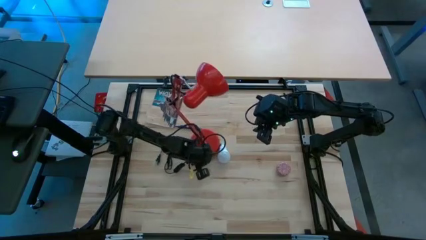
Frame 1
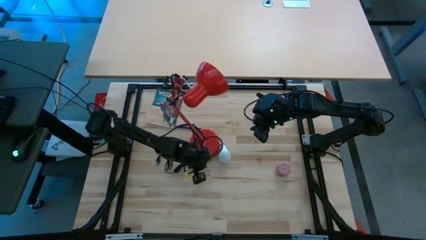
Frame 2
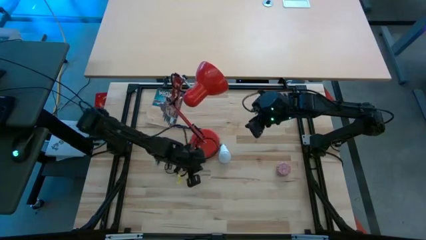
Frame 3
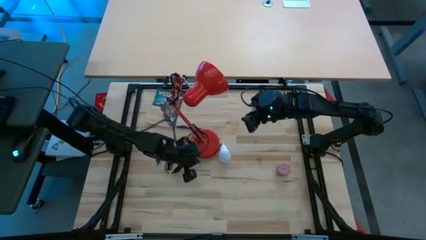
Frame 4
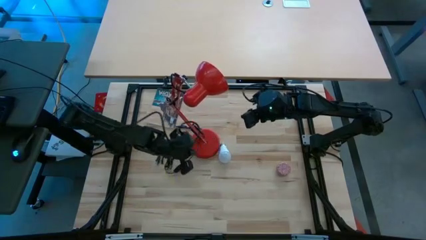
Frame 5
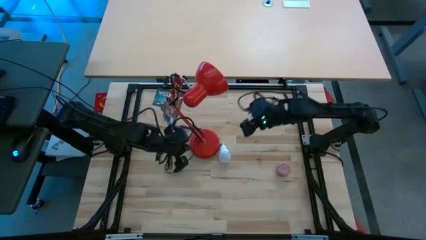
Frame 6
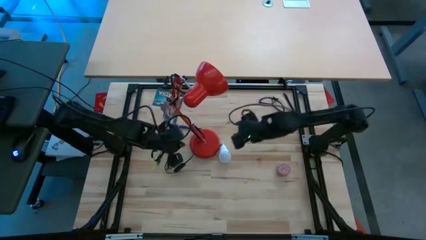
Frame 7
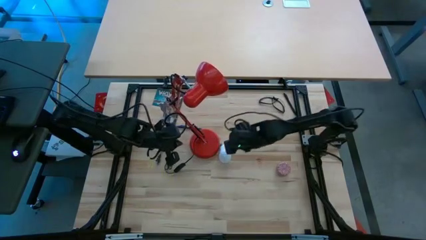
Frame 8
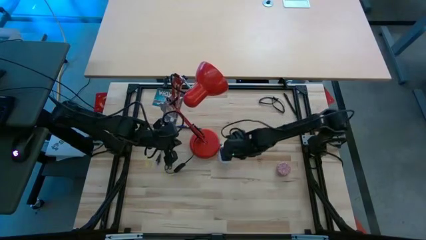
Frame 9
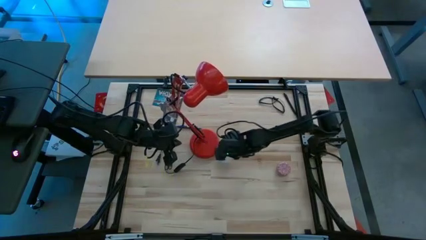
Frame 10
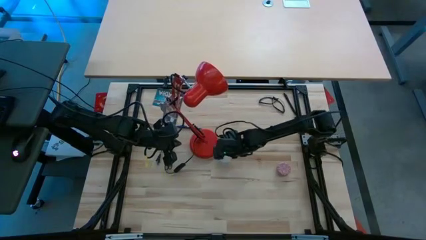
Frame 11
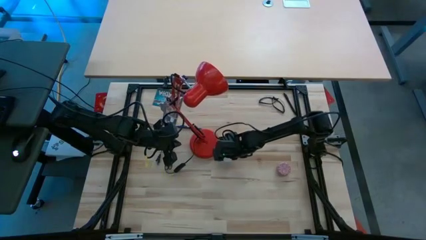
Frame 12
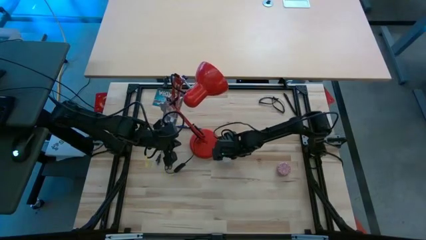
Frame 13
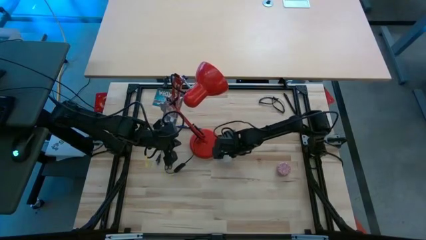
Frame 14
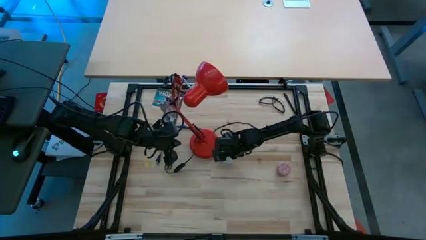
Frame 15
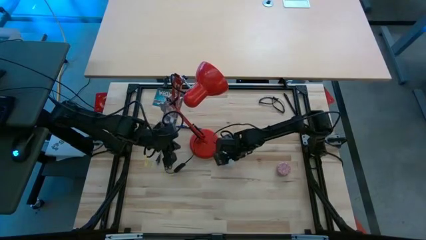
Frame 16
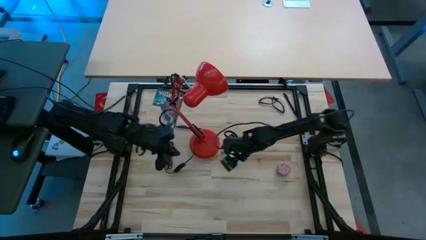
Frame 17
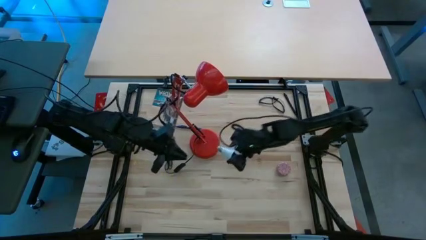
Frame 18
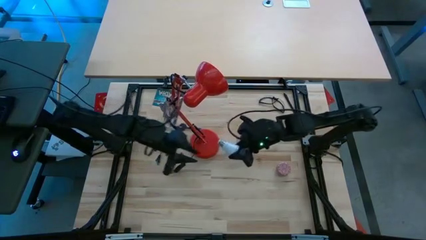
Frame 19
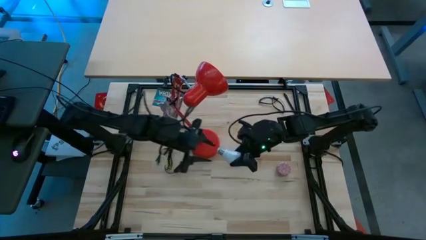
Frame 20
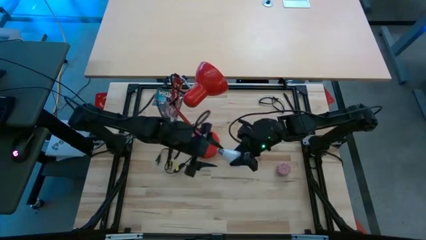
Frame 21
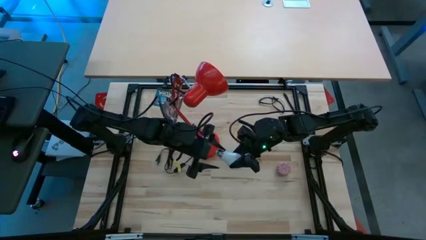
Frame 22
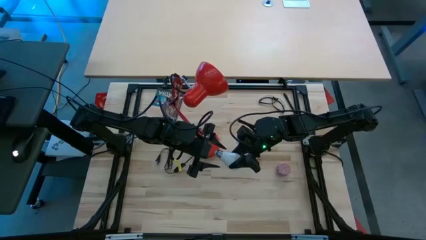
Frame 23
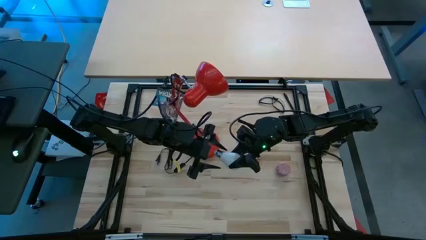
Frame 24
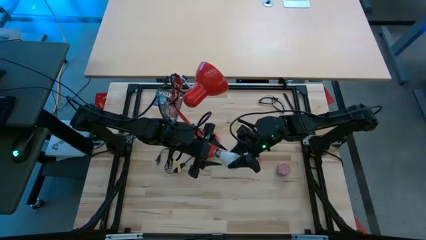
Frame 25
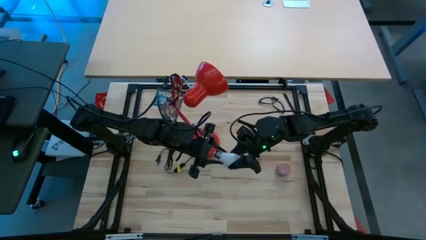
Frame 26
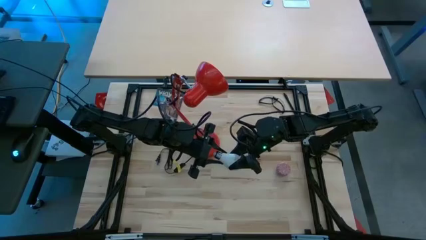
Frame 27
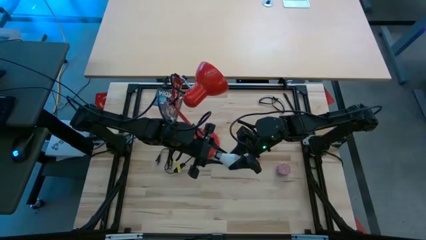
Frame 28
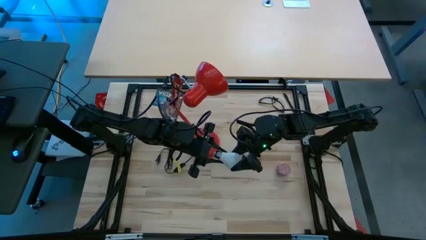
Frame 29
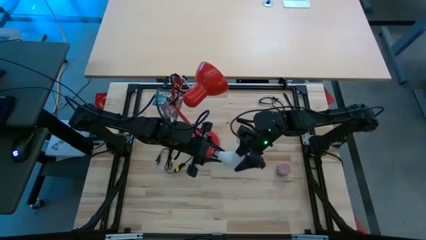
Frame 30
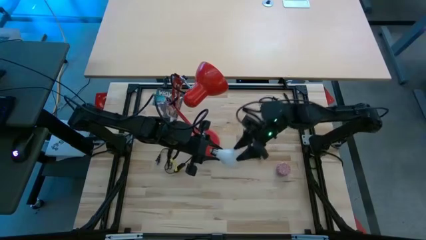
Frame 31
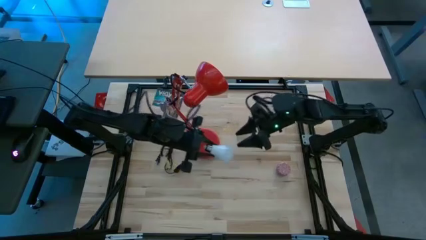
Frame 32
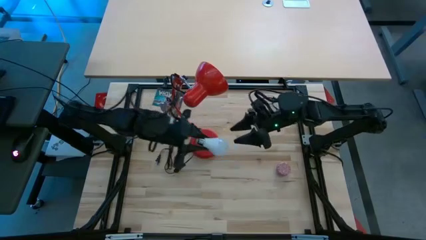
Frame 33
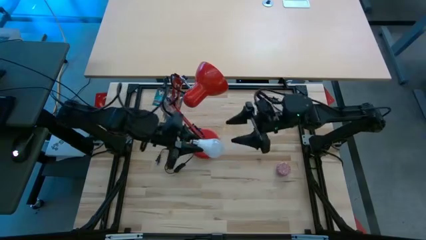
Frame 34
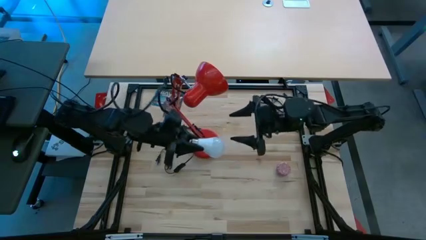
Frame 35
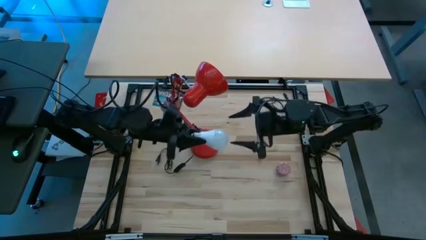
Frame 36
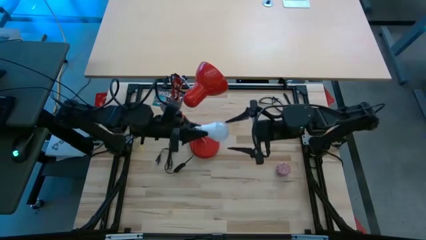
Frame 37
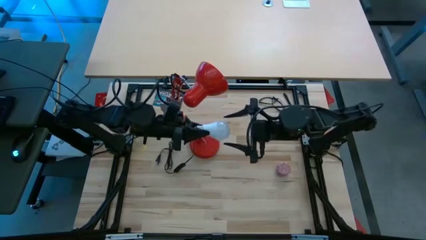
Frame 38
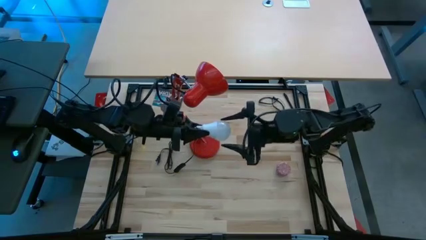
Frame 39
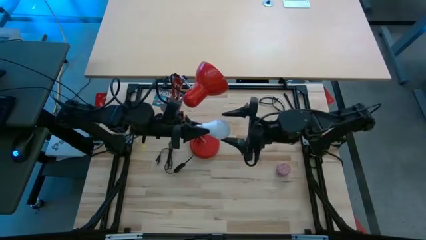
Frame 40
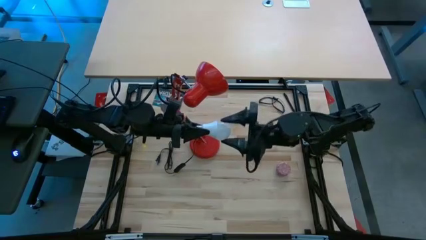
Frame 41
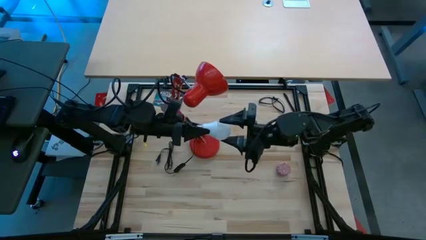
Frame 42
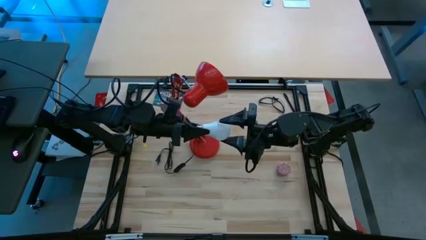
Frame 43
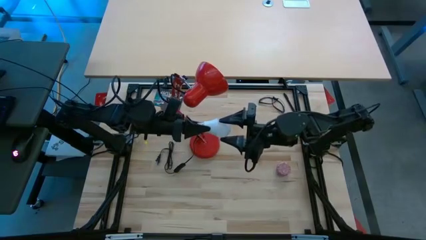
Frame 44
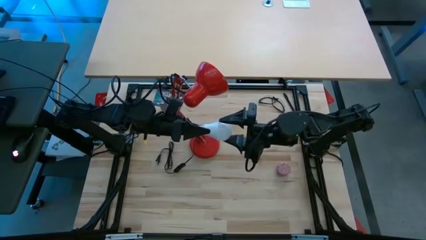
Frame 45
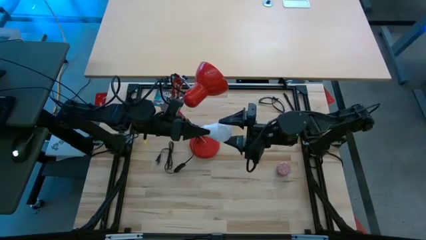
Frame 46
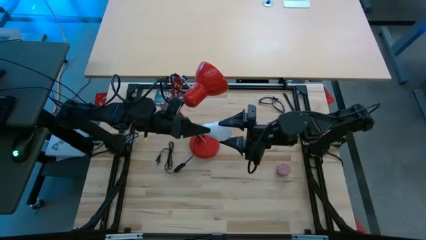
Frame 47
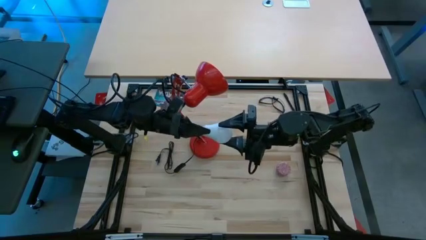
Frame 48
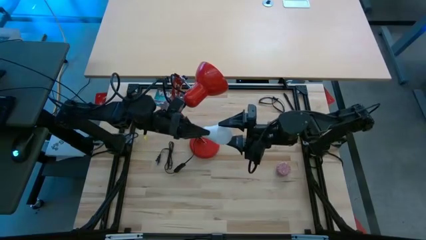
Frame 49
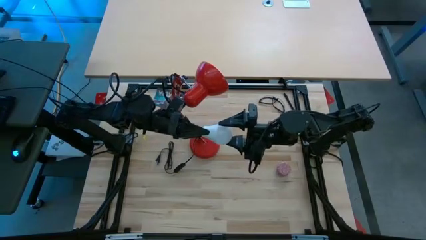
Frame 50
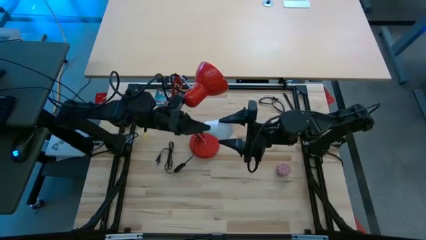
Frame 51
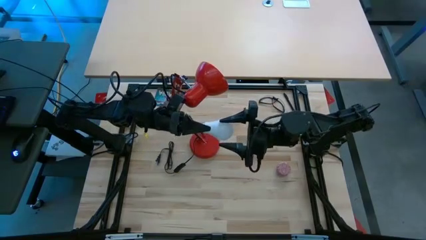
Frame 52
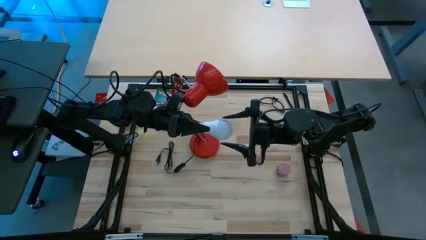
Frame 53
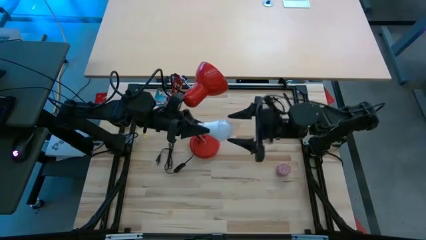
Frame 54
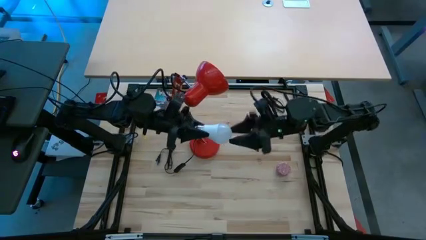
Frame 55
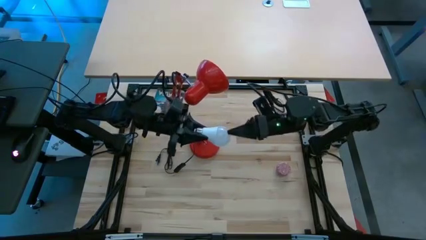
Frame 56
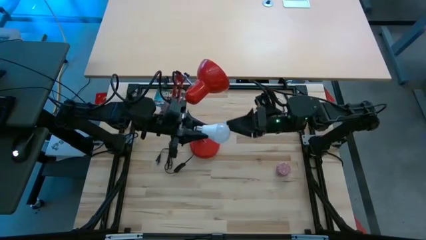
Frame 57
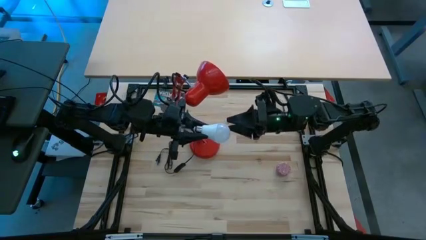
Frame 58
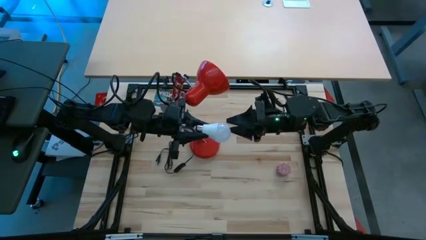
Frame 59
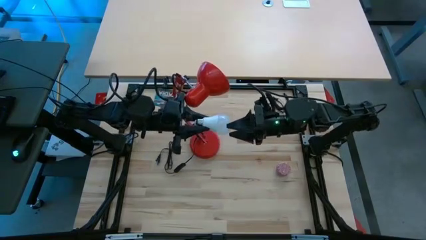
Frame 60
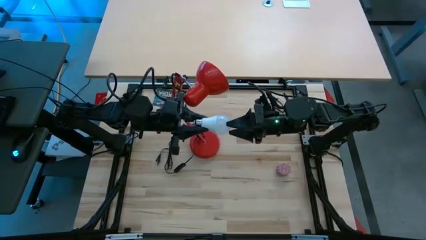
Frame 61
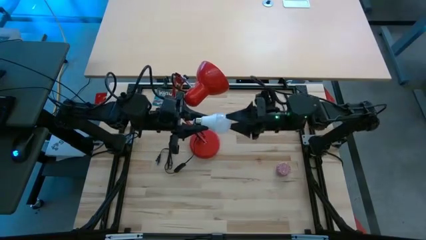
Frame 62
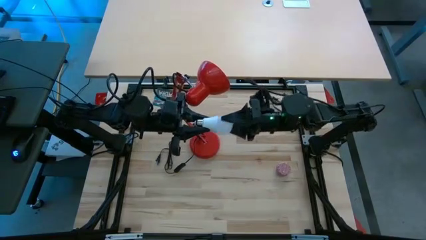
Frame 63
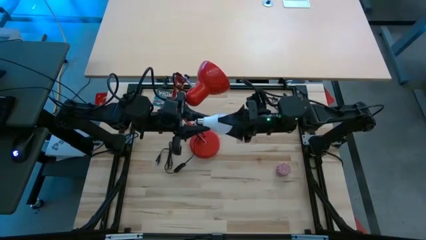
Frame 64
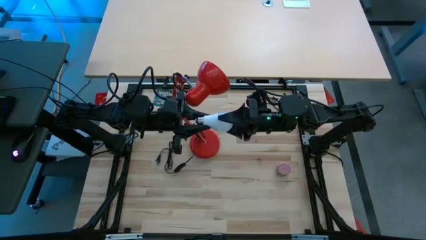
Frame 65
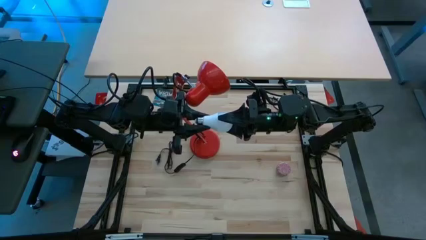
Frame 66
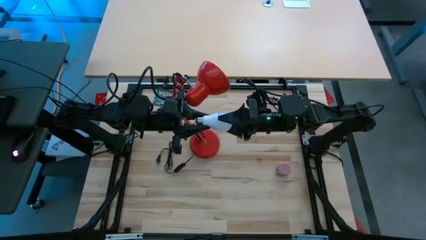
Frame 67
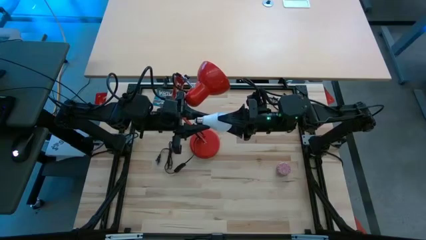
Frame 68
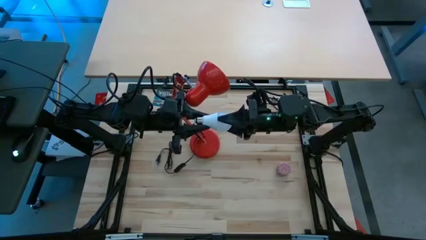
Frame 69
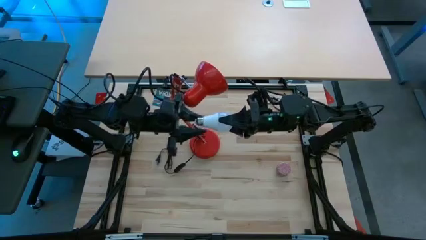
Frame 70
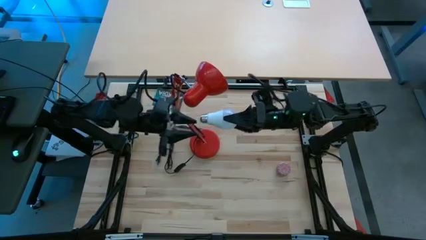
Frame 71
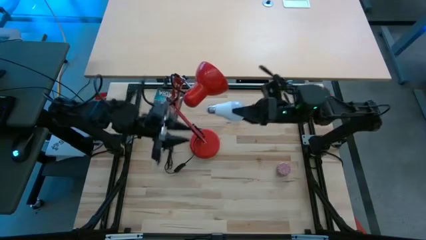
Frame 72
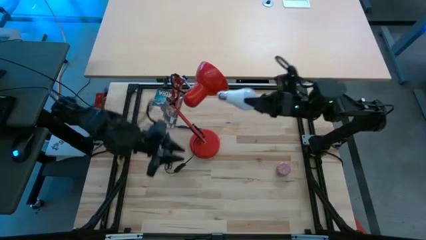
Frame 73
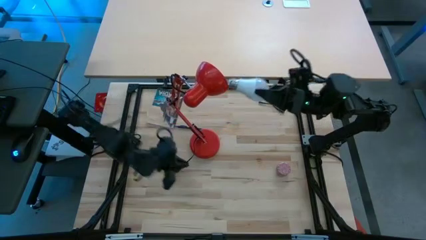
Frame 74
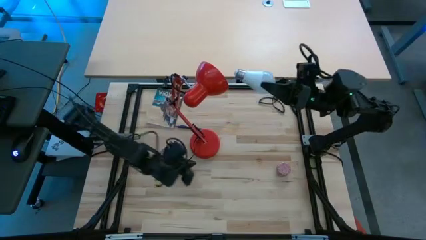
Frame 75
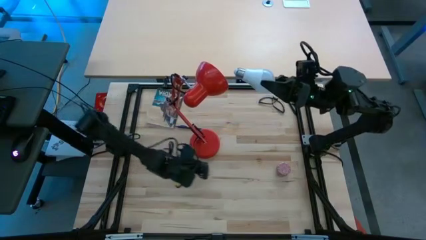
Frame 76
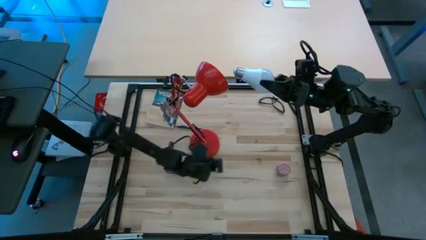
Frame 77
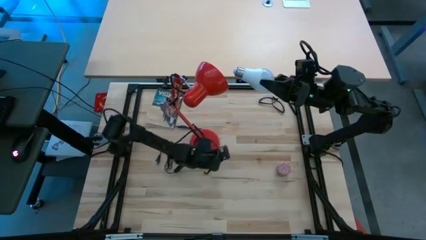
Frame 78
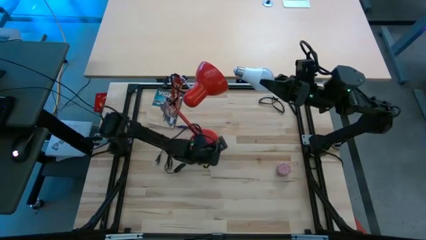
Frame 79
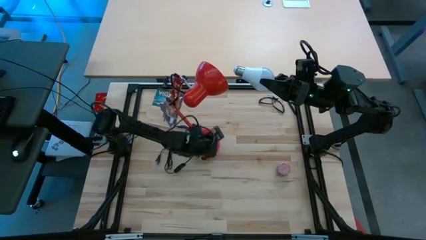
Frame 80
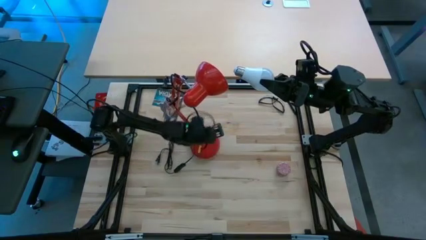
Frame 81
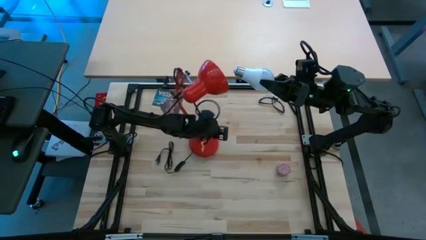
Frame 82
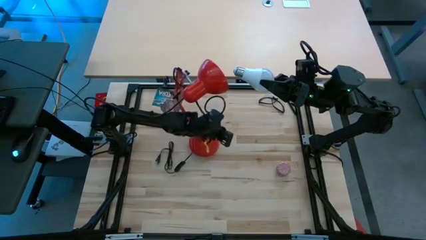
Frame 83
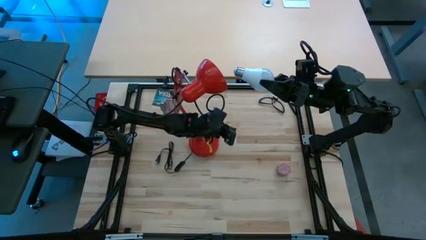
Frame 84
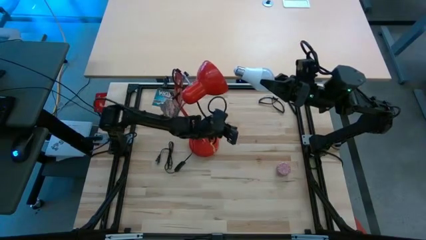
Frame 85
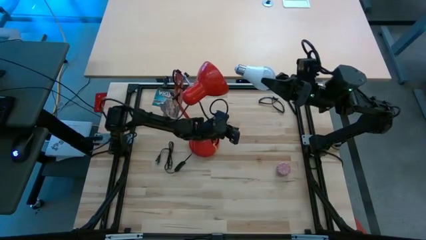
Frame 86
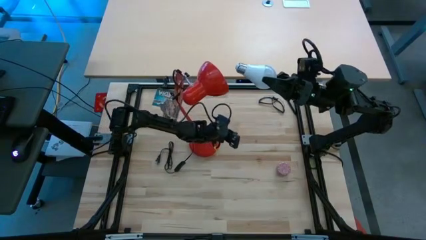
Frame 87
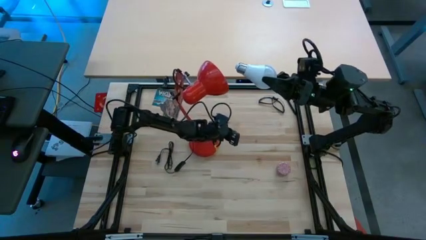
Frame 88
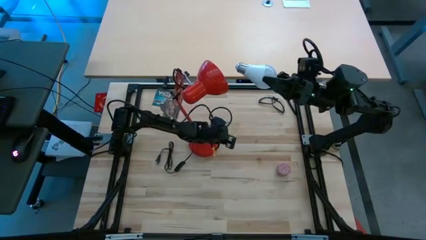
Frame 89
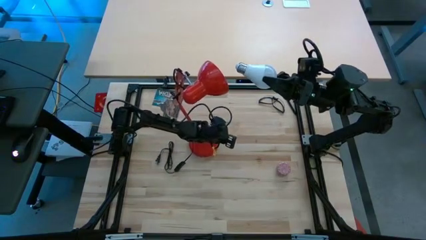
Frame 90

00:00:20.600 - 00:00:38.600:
Task: Screw lightbulb
Insert the lightbulb on the lamp
